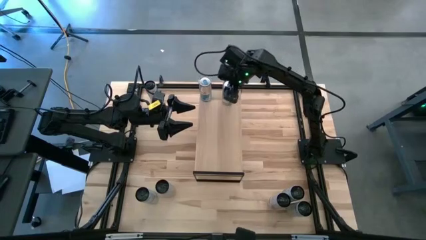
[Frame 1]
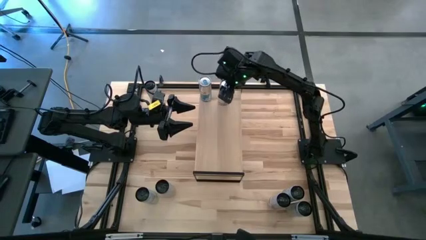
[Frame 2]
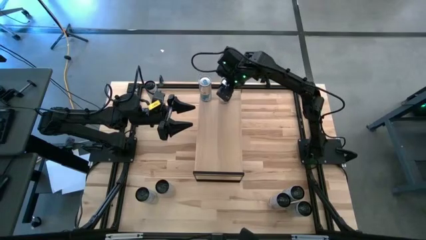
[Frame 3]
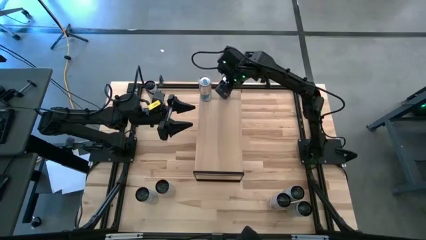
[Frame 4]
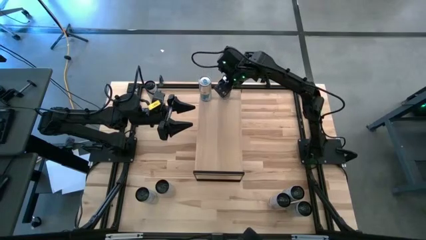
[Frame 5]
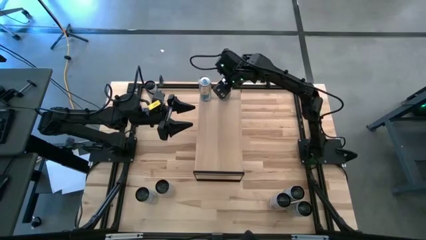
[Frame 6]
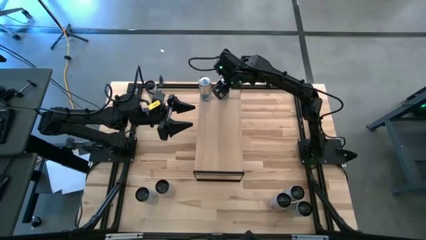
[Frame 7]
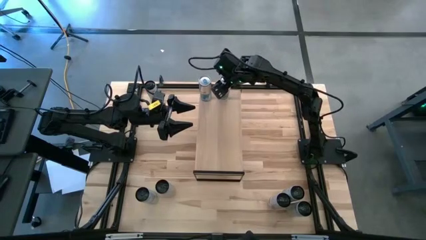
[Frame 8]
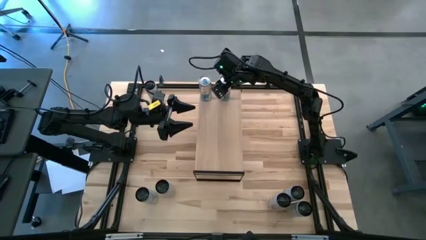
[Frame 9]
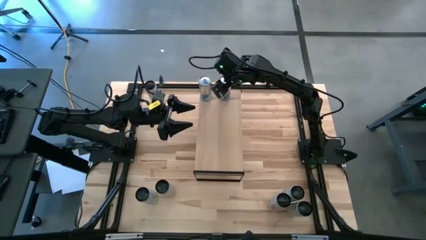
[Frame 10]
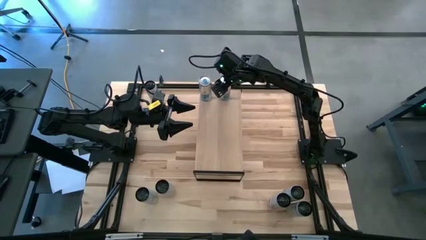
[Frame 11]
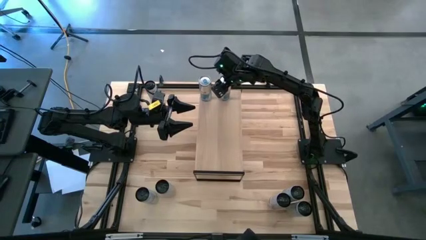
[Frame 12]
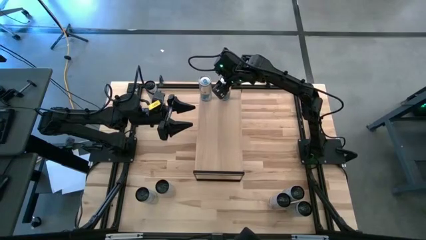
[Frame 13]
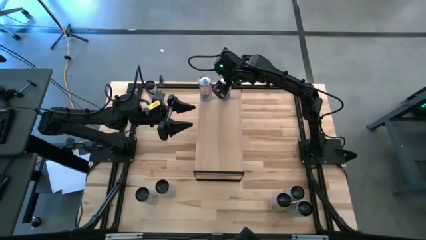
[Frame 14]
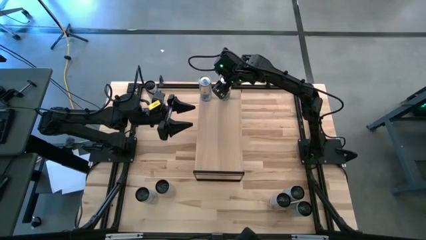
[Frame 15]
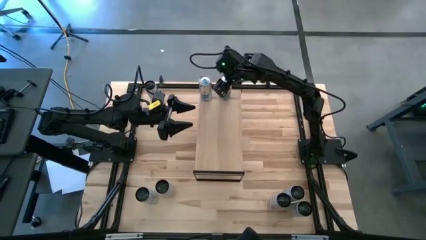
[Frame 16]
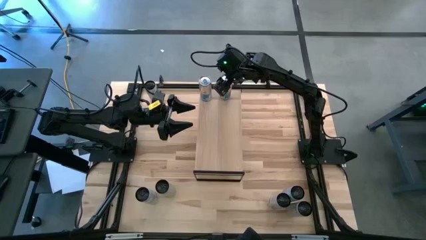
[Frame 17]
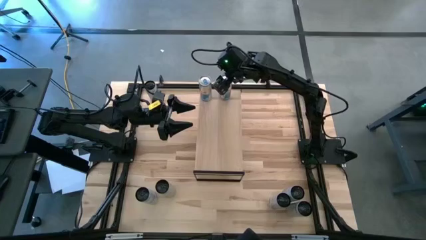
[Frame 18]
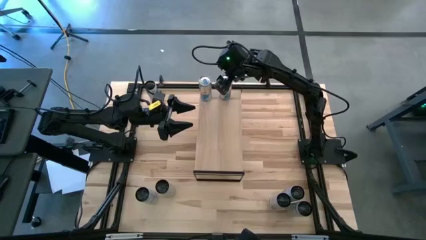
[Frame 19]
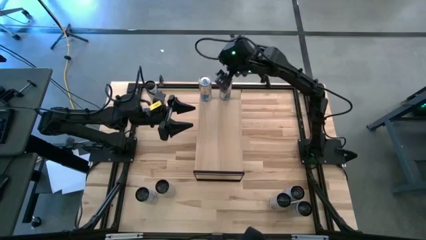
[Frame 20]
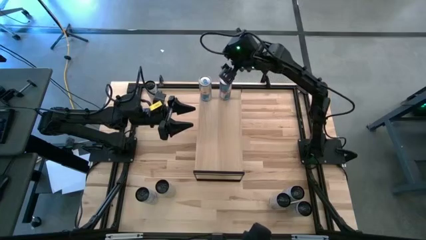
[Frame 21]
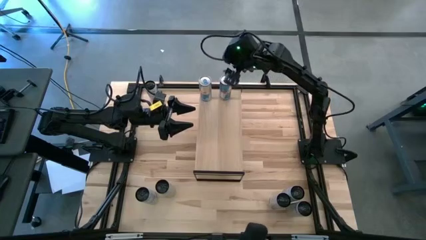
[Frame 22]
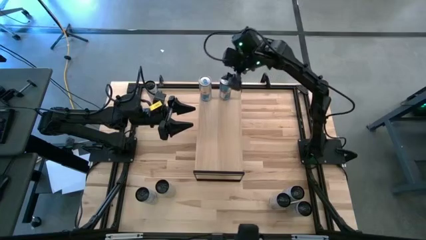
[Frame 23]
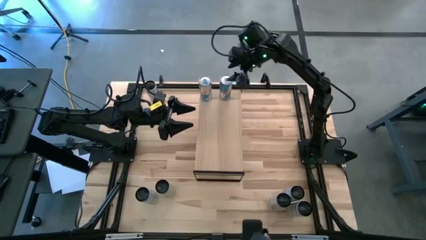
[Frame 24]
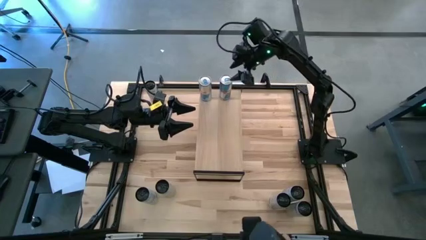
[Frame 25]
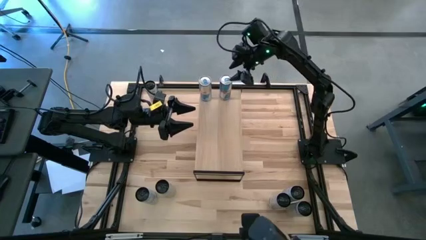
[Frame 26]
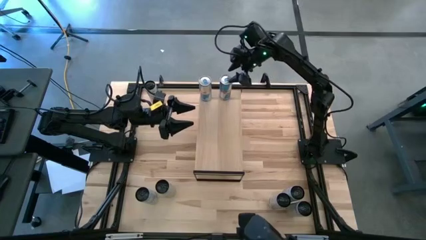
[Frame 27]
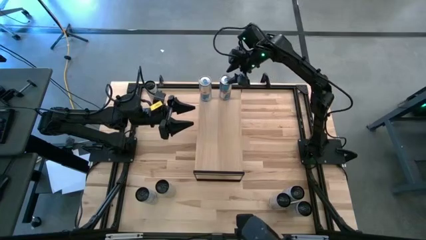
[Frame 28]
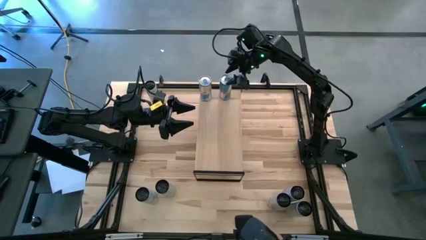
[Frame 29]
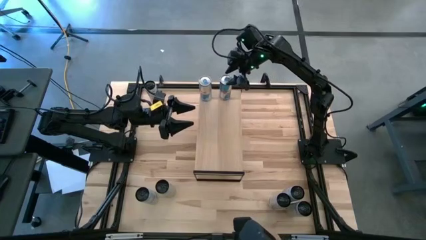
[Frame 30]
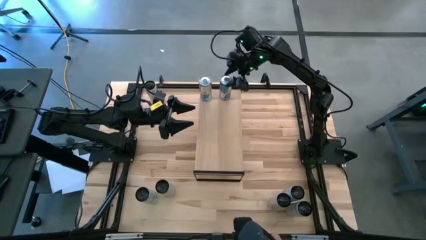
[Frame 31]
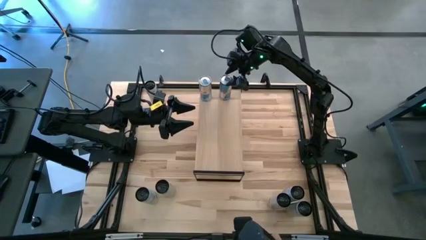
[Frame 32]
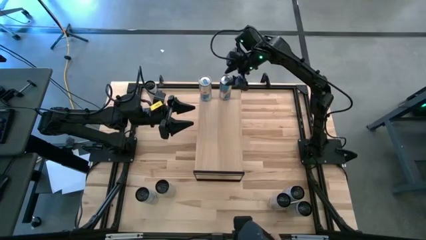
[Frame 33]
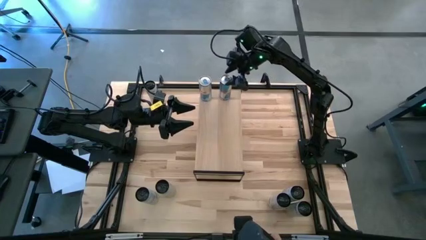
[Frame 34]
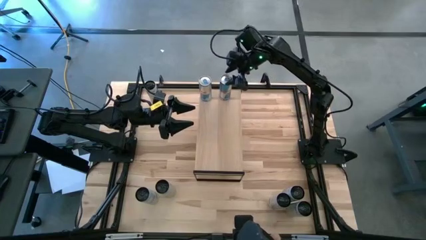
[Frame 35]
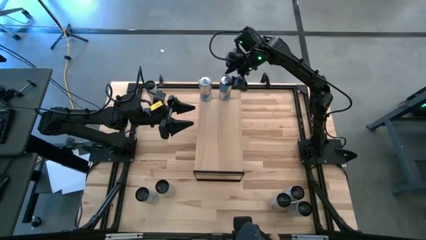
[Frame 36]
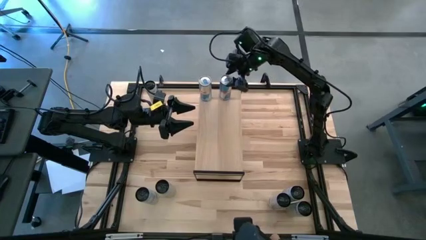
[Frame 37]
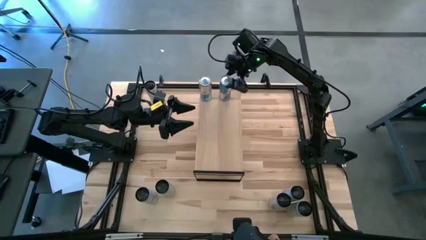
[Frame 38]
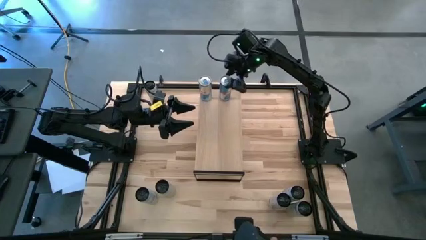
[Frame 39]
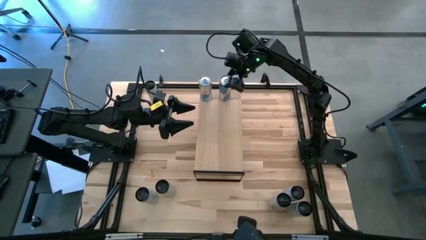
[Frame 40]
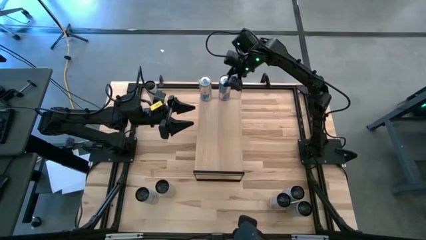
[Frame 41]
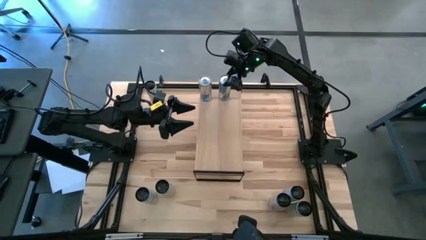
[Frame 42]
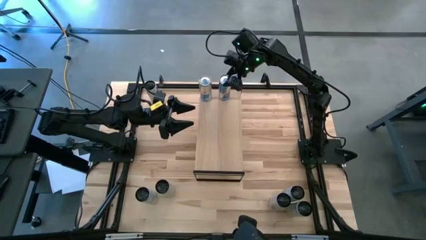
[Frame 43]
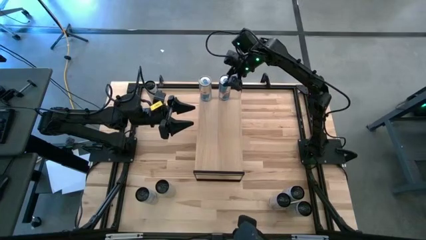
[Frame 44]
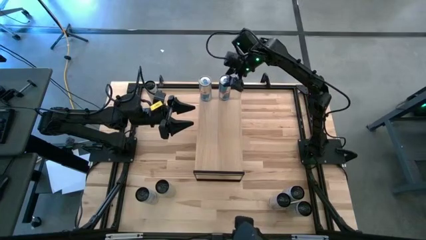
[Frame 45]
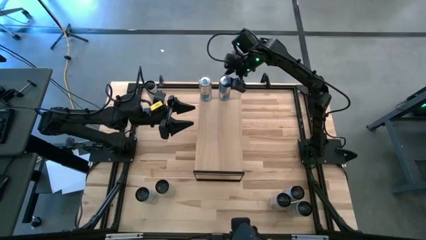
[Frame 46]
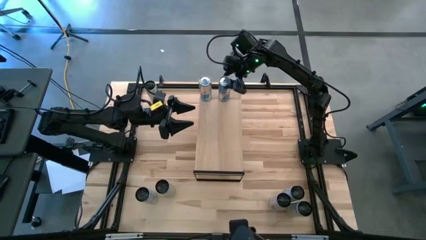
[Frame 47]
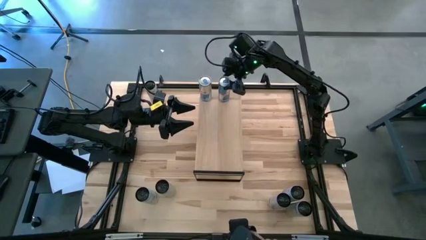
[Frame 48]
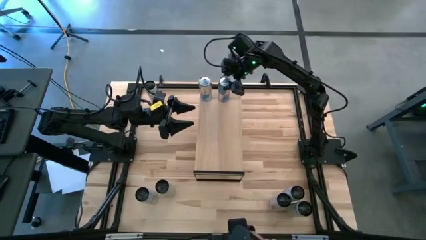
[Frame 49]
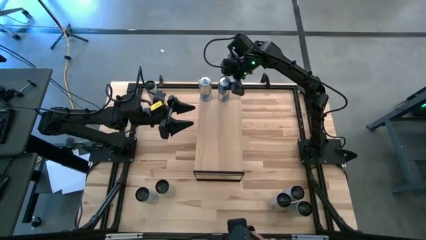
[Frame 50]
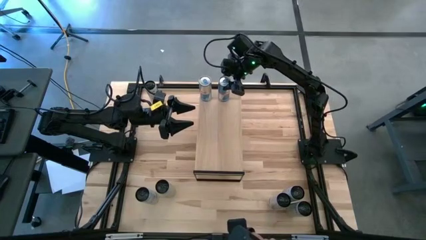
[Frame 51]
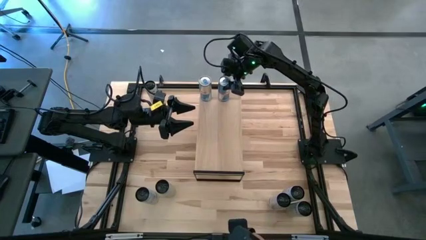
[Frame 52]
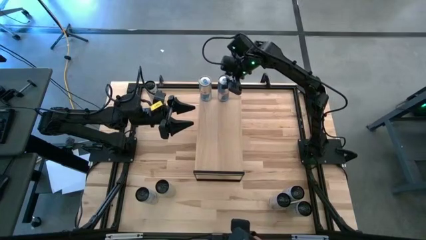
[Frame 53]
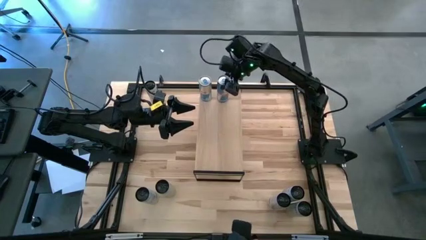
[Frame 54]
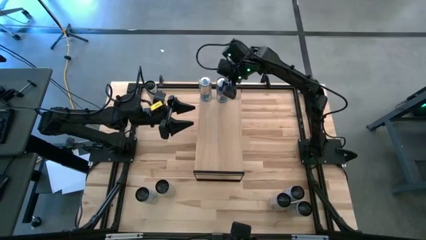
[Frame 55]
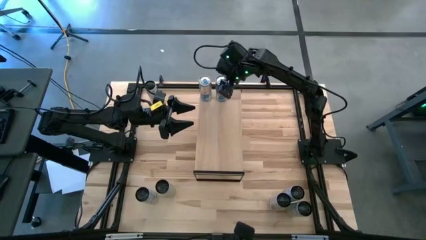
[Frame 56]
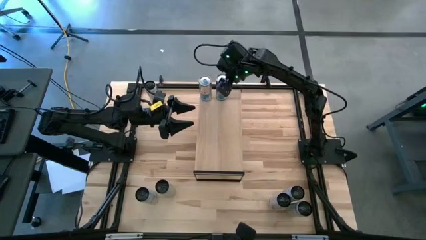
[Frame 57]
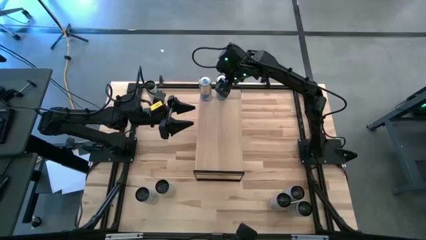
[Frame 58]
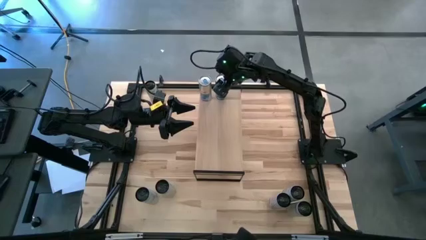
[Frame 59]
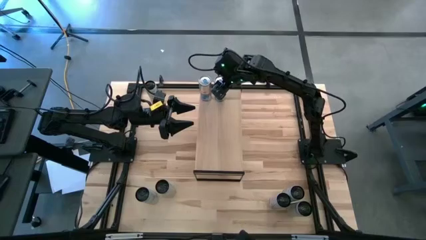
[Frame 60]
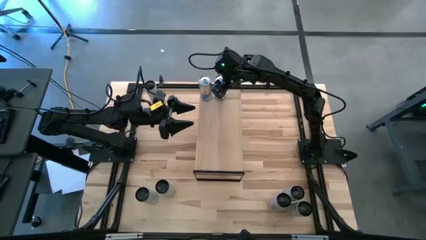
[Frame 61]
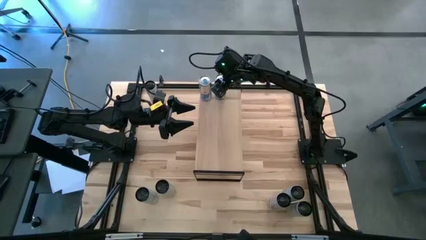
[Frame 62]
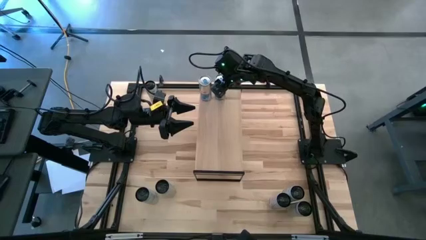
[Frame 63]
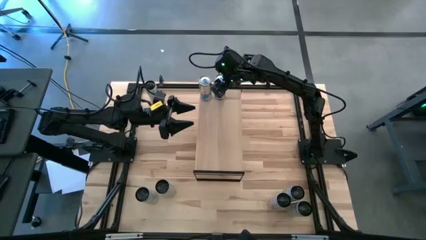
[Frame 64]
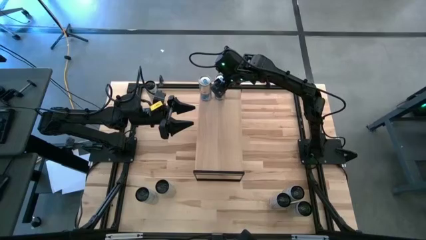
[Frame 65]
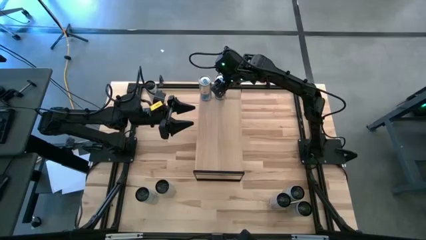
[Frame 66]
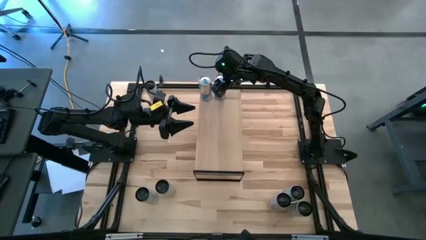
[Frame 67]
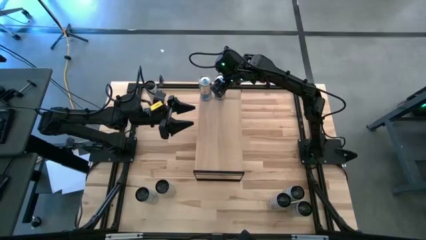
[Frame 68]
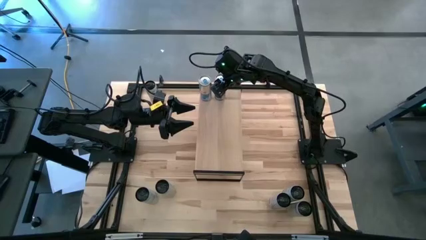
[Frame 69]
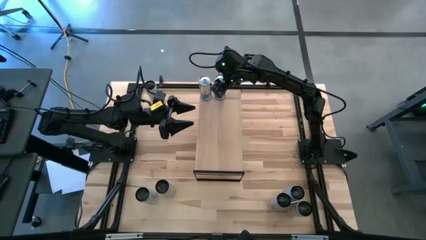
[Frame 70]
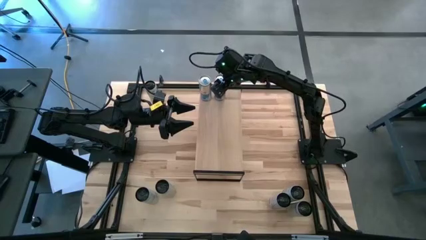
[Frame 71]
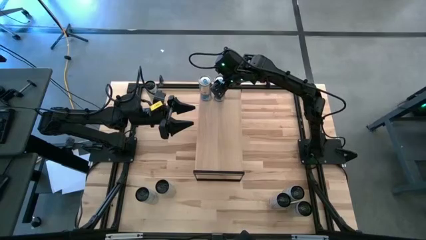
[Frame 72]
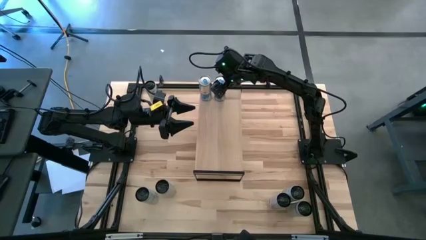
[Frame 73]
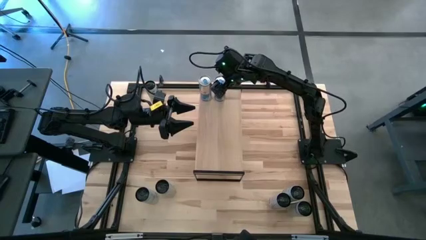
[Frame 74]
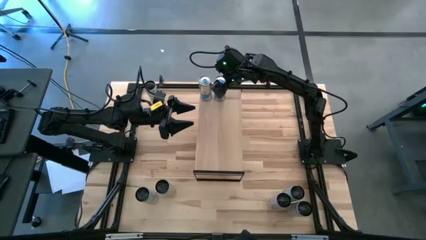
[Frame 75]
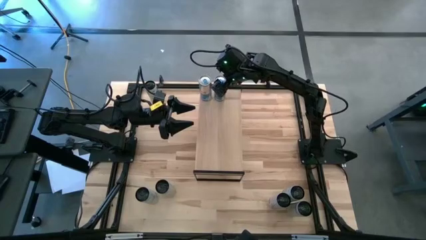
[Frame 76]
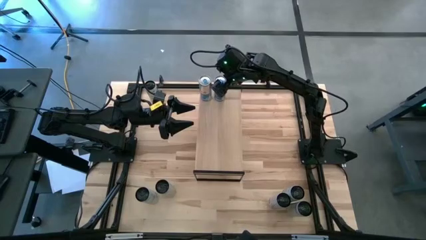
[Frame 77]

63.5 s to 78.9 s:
Task: Place canned beverage on shelf
Put the blue soda can on the shelf aligned with the other blue soda can
